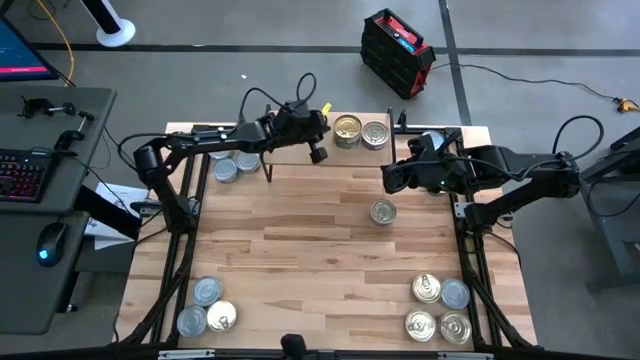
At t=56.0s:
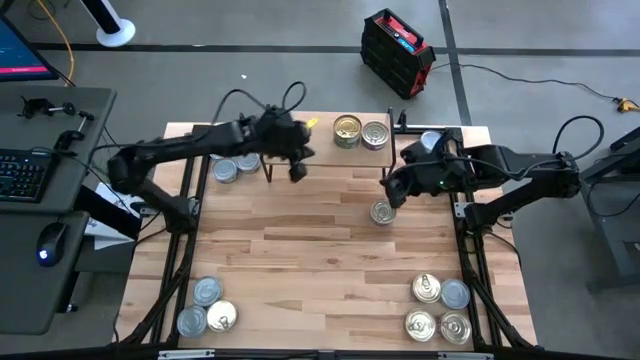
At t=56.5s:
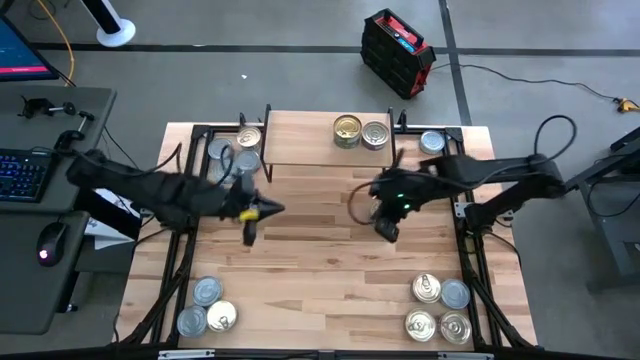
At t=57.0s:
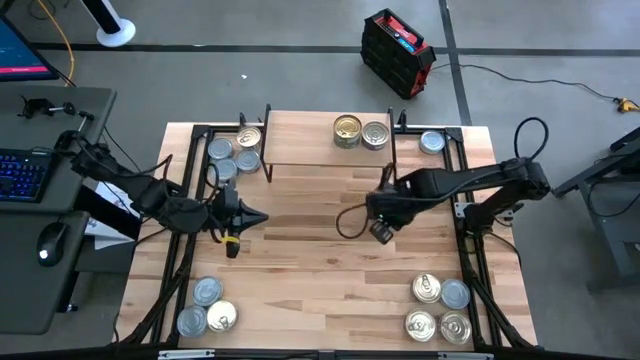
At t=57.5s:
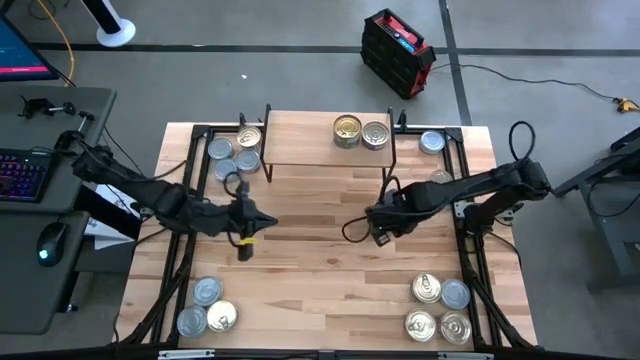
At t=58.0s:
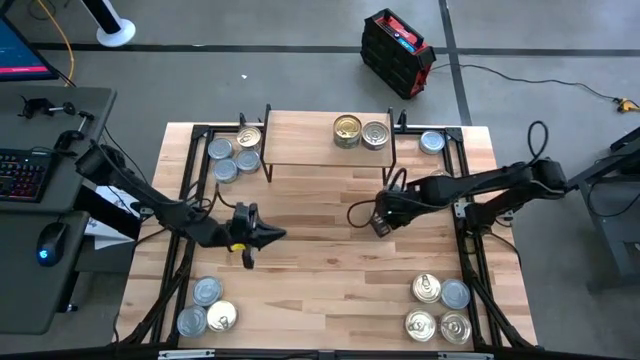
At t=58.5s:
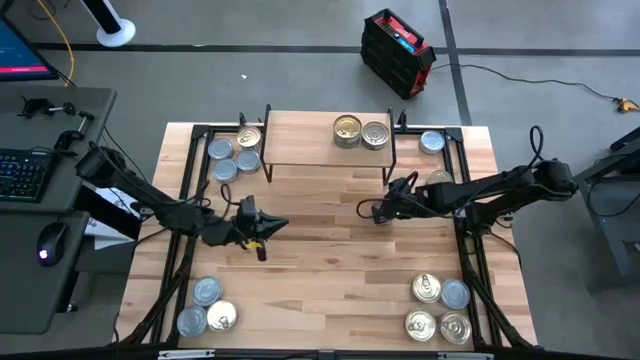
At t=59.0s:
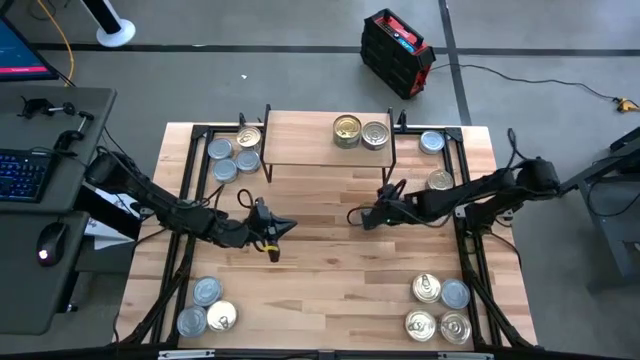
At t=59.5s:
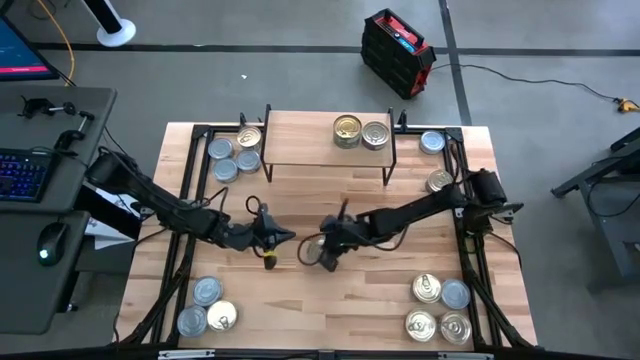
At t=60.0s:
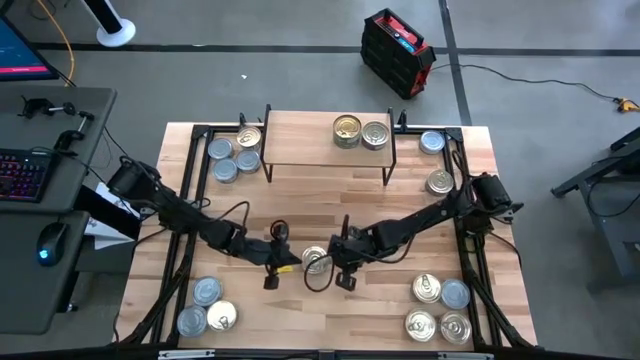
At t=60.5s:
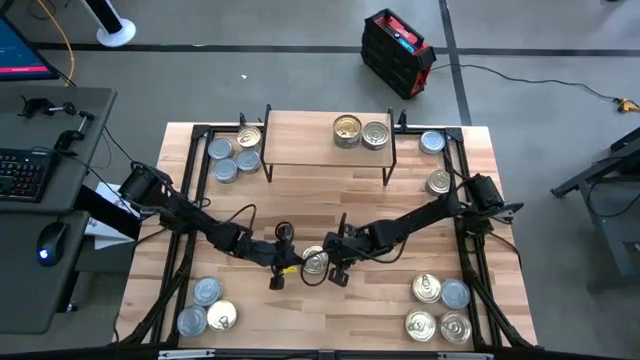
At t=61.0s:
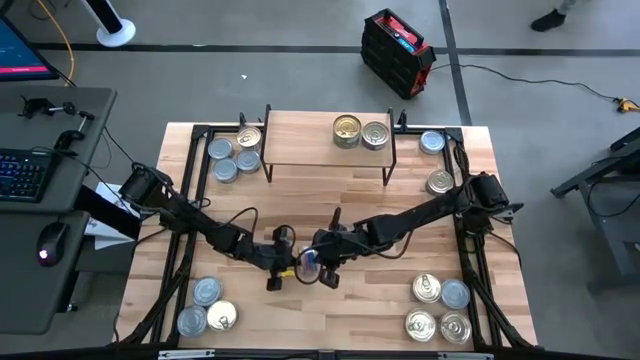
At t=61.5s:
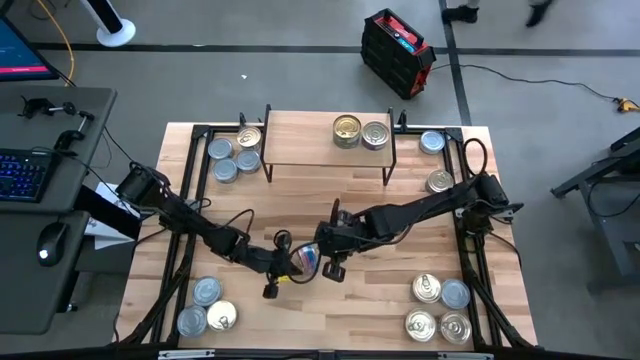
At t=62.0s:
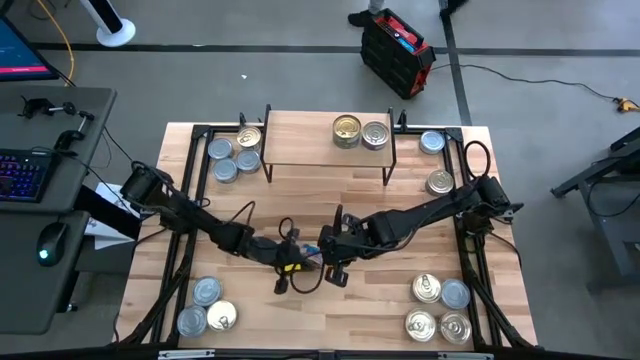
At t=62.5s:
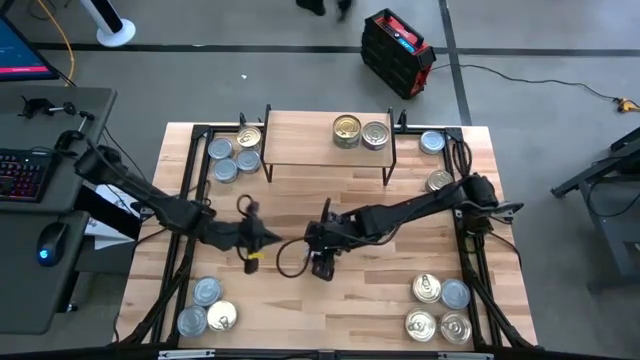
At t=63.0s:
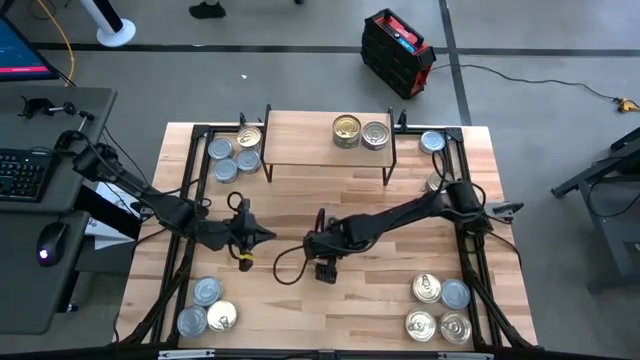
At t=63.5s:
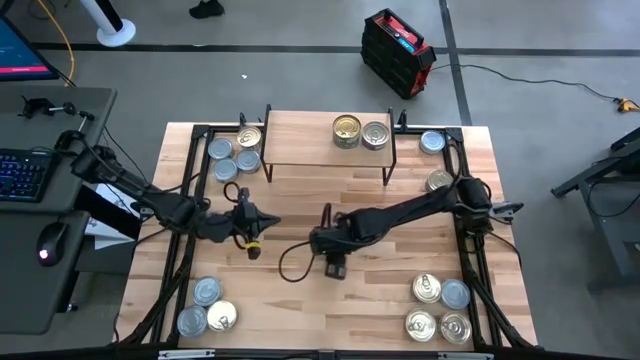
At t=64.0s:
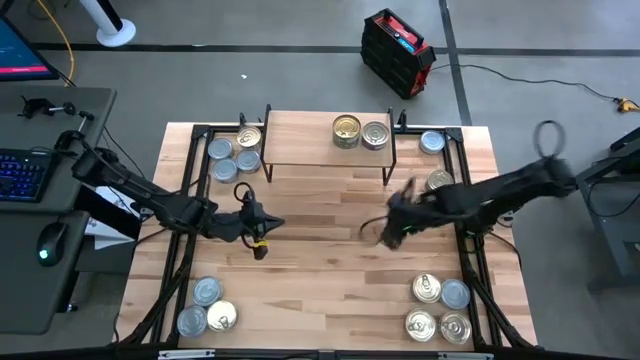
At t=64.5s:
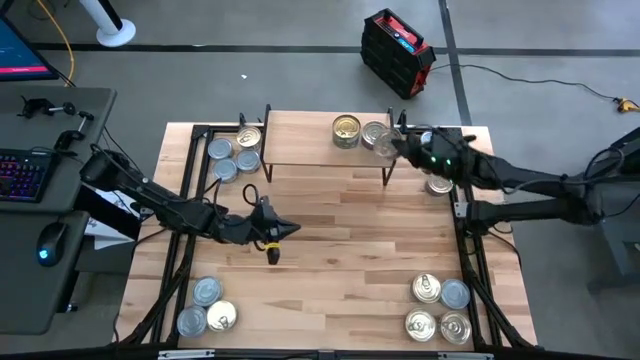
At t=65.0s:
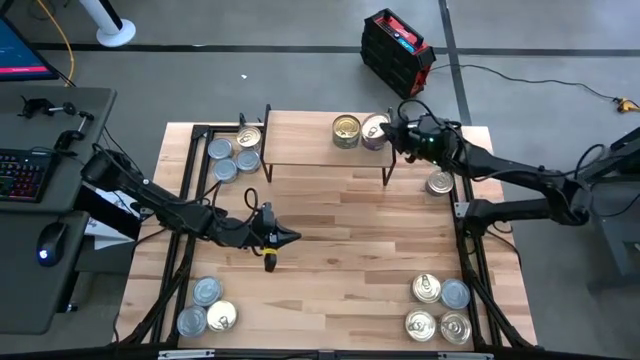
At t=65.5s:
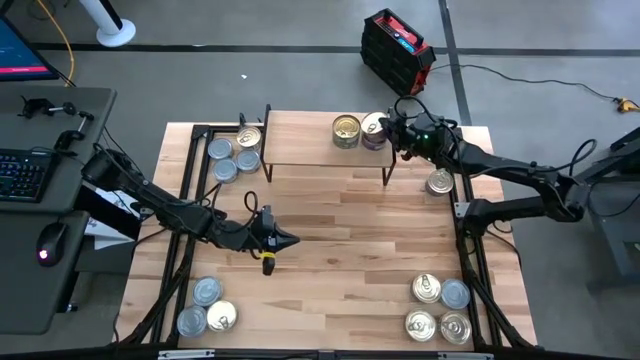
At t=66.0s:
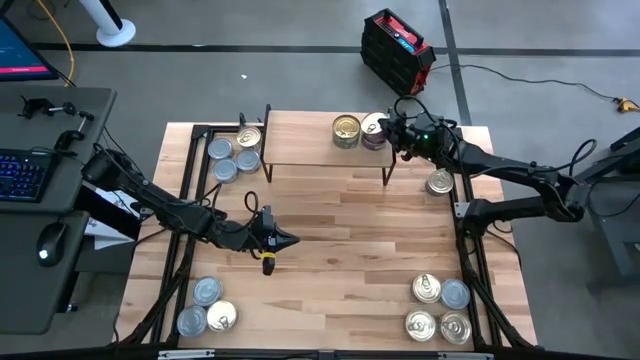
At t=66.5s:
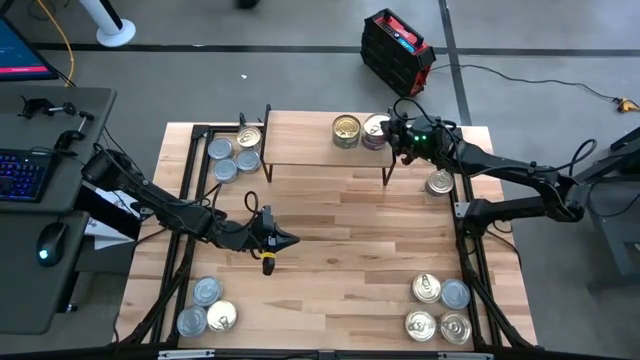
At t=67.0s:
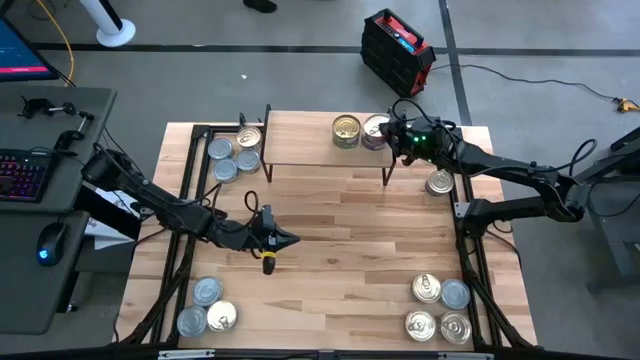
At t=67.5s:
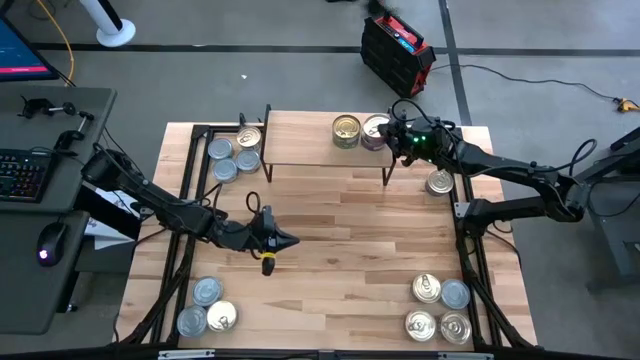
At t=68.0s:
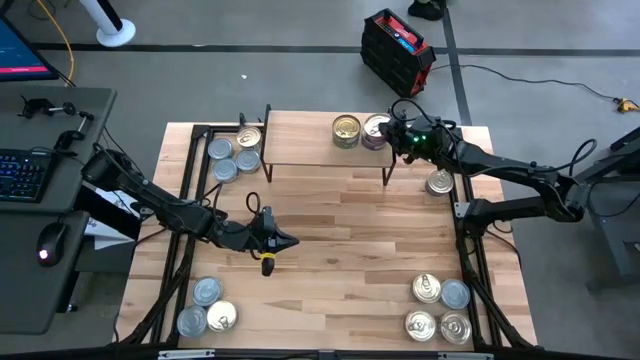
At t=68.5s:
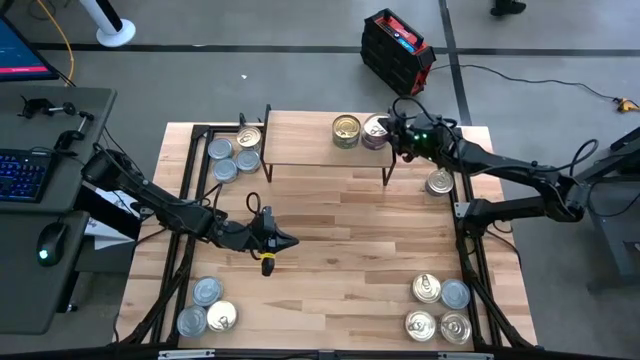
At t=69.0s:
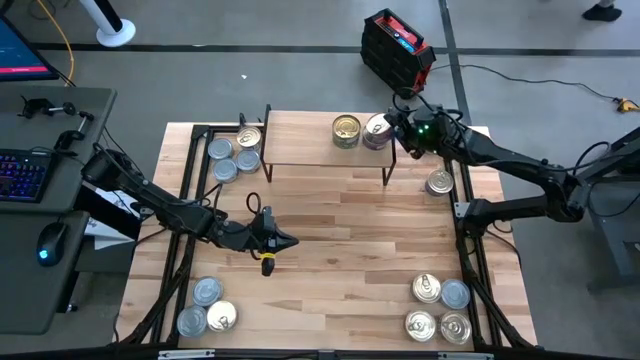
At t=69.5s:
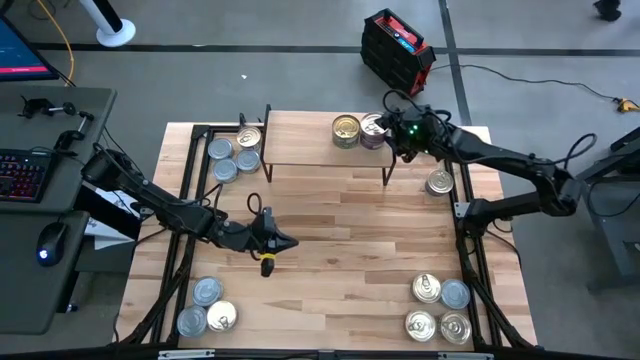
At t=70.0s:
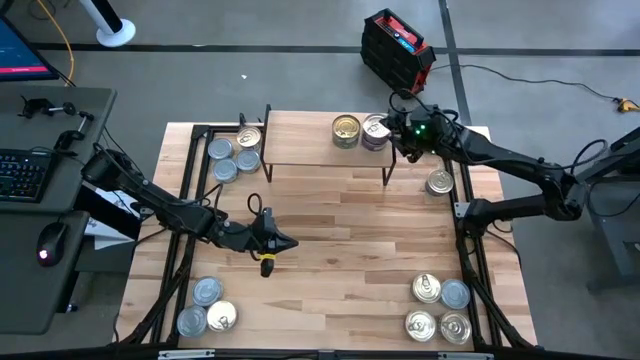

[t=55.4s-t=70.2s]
Task: Stack canned seafood by type on shelf
Stack the blue pink tuna can on top of the other blue pink tuna can on the shelf

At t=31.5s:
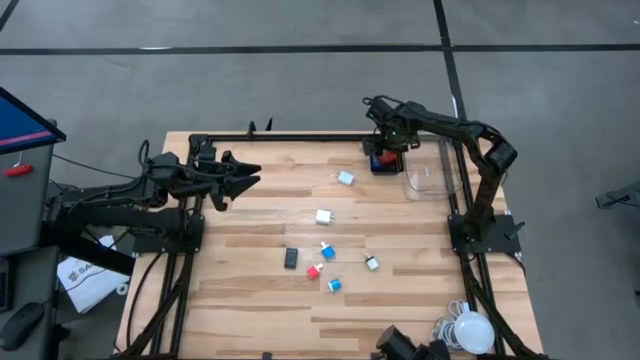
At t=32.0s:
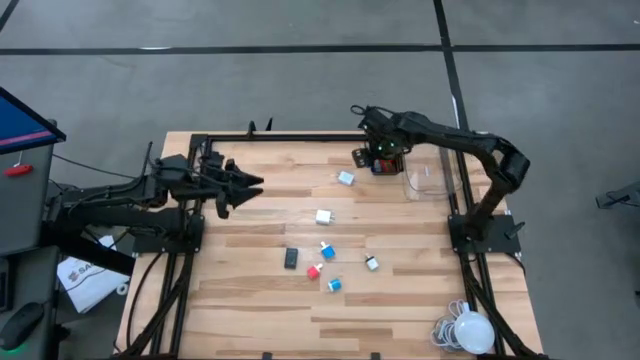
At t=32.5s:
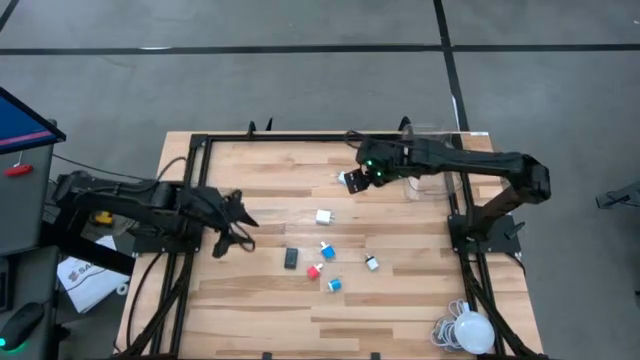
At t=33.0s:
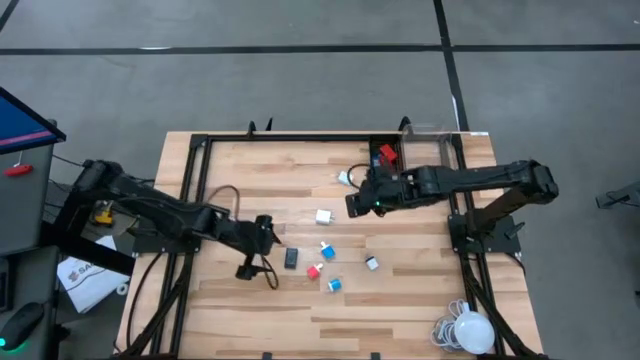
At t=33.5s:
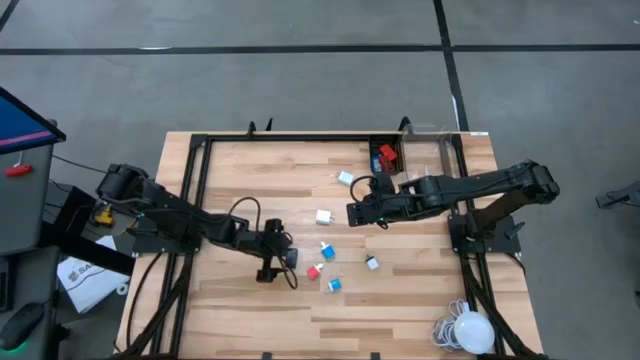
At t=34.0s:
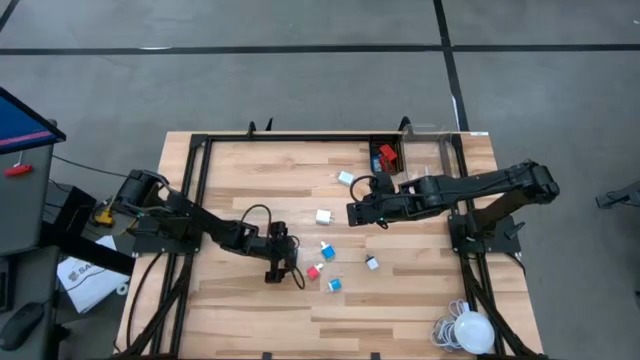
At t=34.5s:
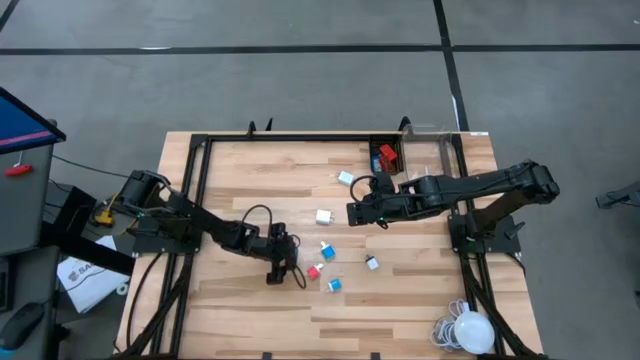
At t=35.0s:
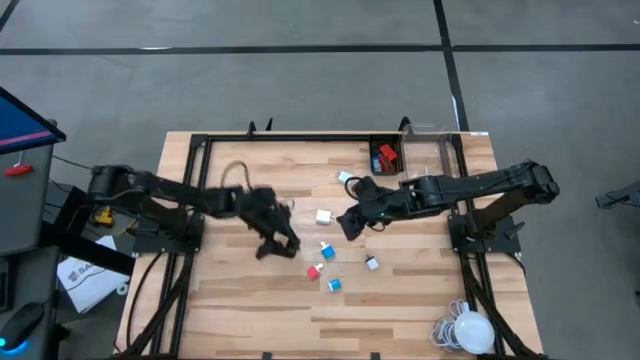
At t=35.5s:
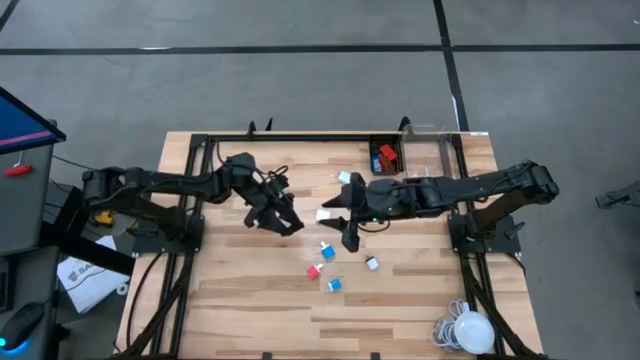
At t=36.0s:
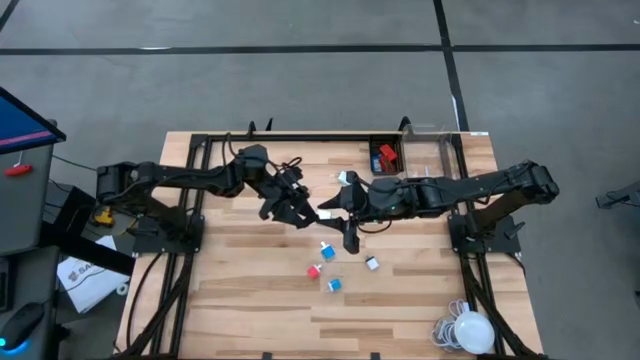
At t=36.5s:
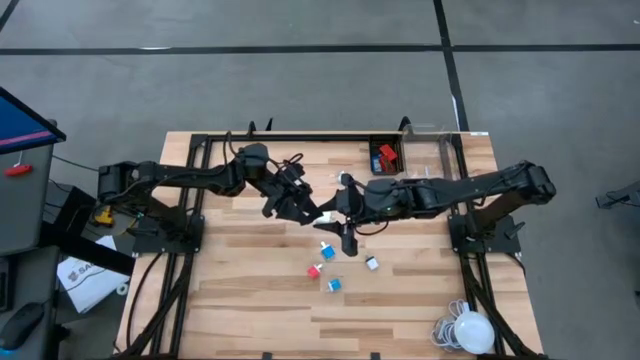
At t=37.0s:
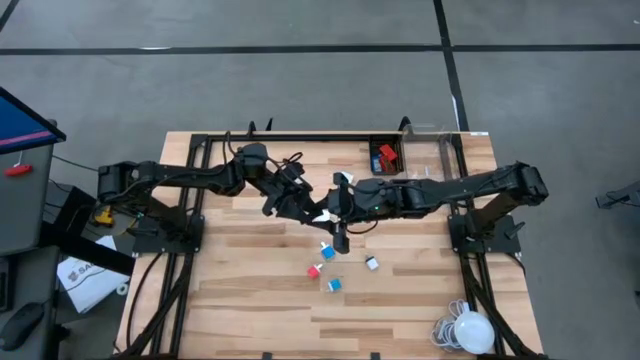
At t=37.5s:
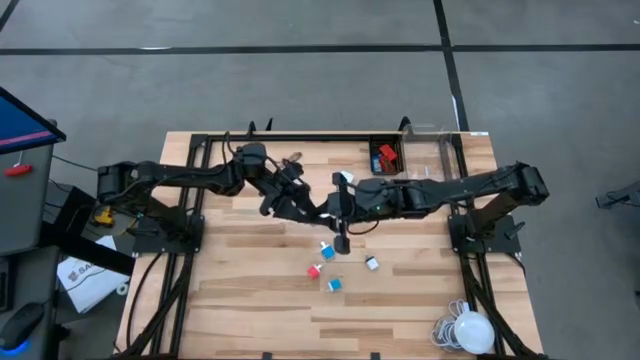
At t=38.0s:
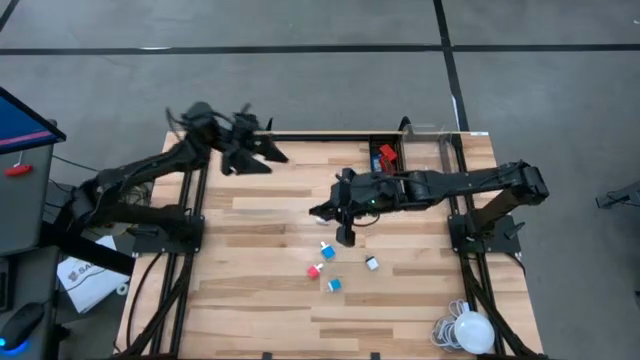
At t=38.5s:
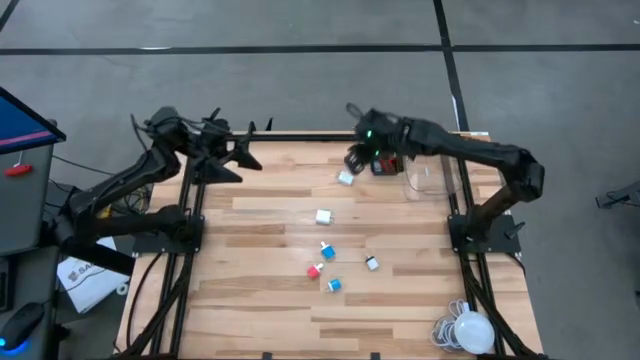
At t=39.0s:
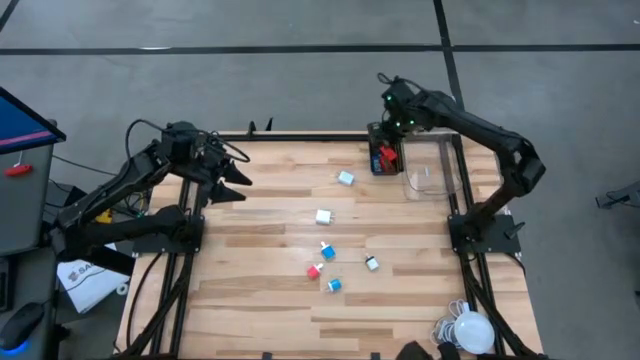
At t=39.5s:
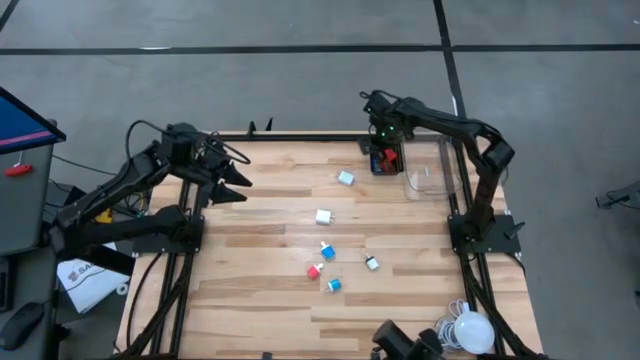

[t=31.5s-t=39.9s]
Task: Pick & Place Office items
Put the black digital timer into the black bin
